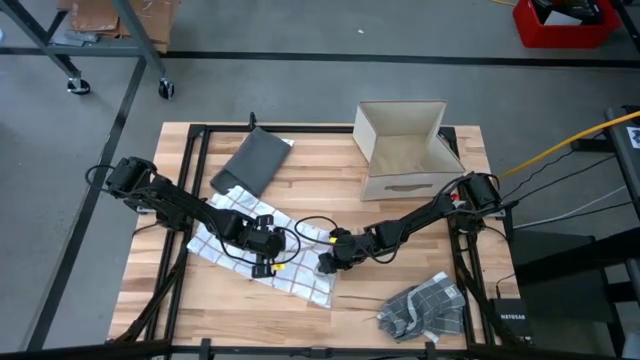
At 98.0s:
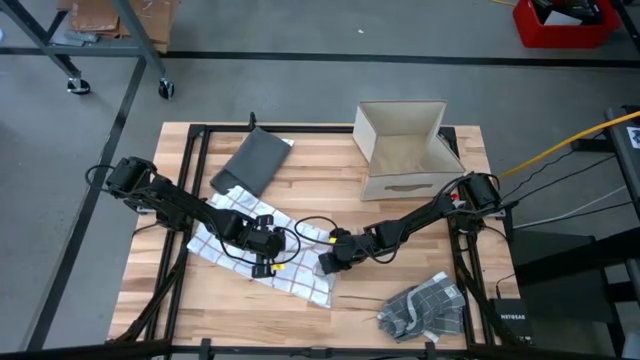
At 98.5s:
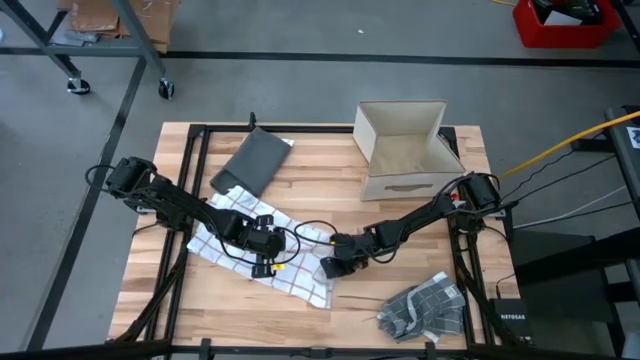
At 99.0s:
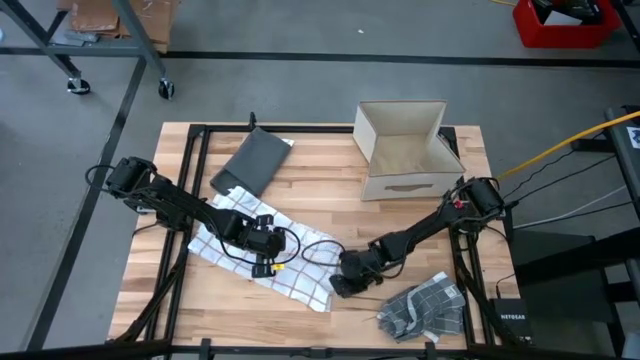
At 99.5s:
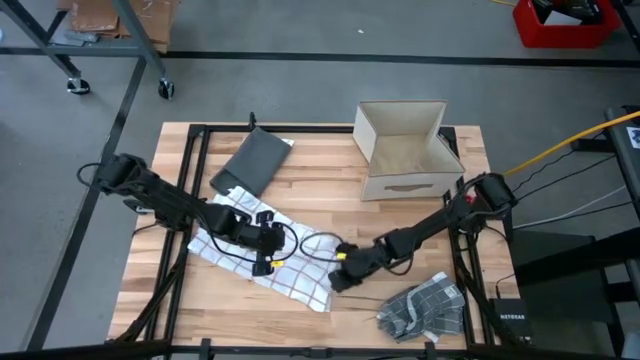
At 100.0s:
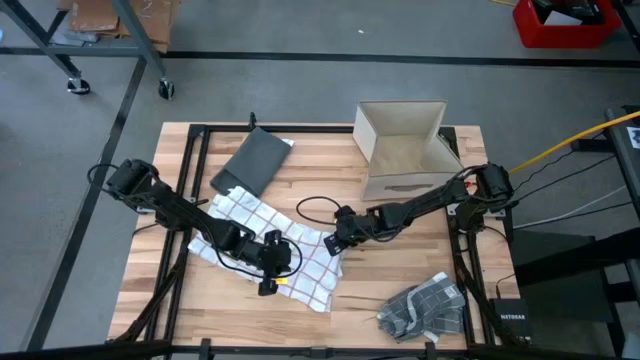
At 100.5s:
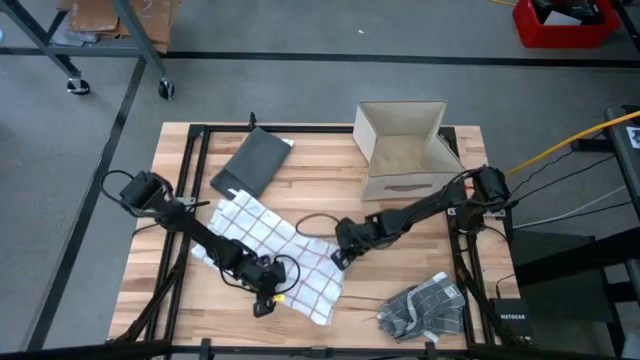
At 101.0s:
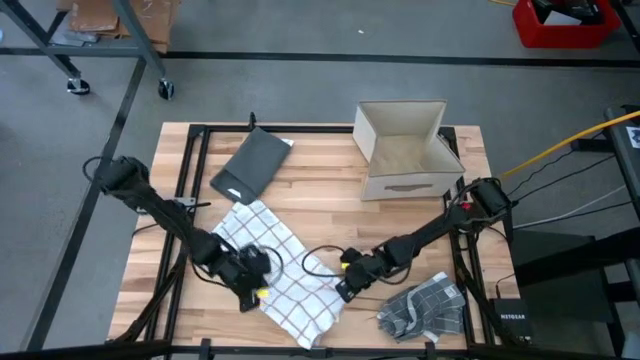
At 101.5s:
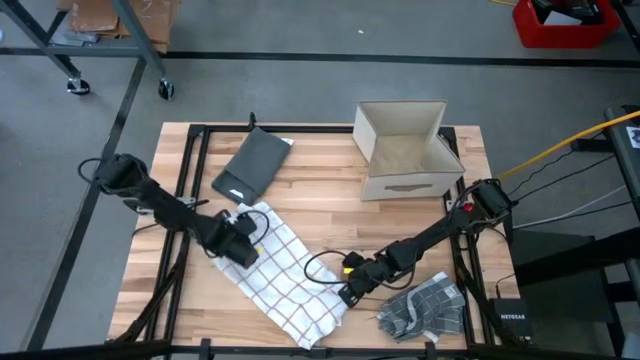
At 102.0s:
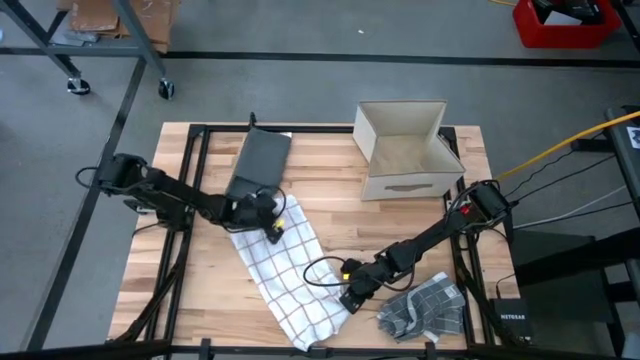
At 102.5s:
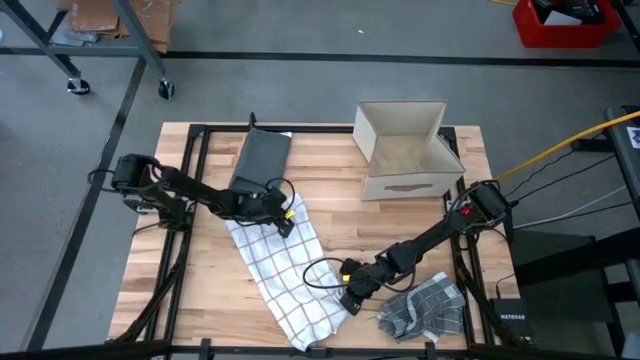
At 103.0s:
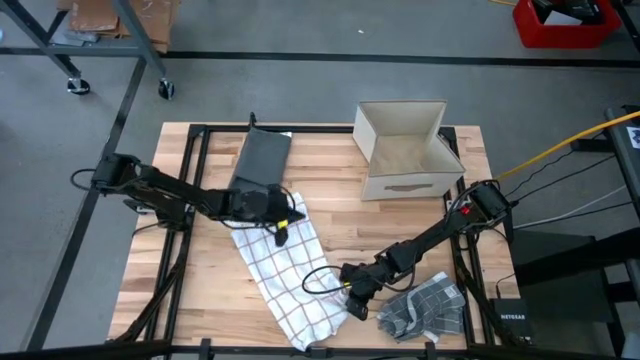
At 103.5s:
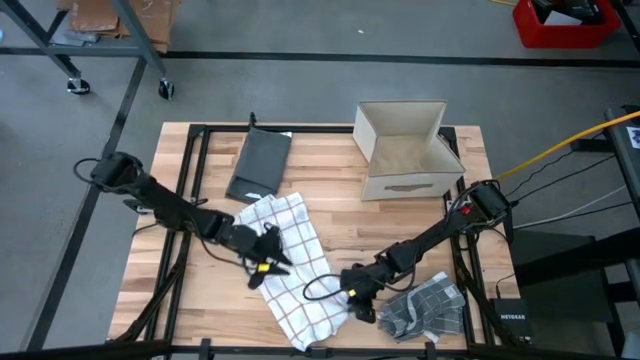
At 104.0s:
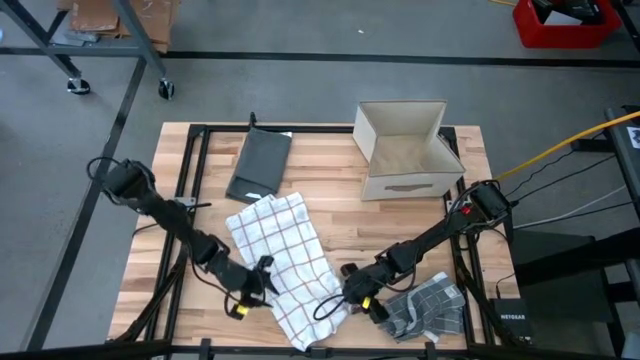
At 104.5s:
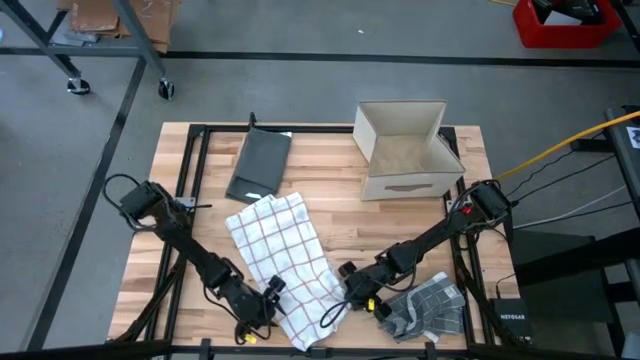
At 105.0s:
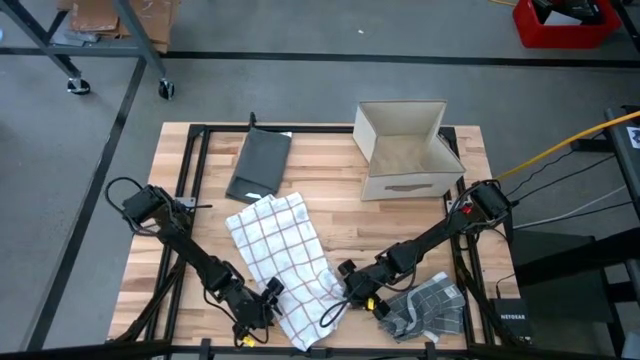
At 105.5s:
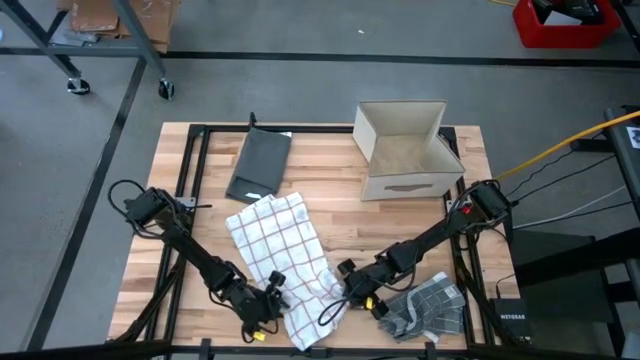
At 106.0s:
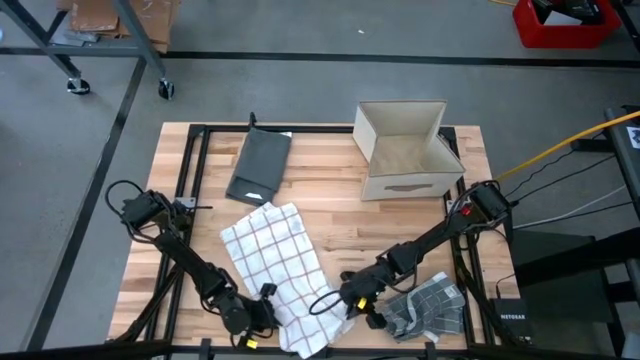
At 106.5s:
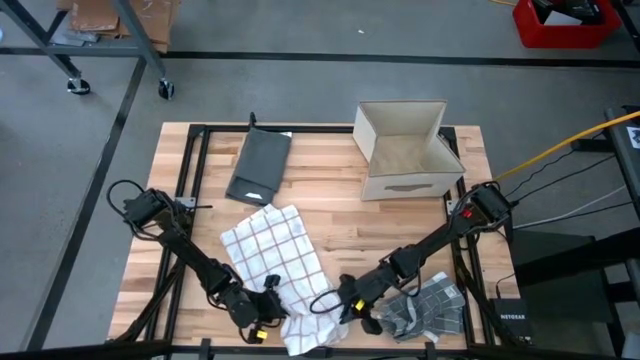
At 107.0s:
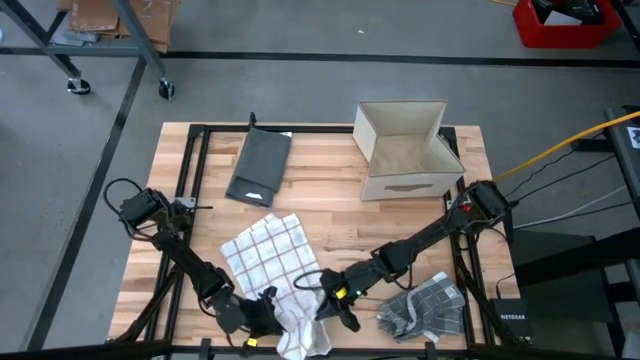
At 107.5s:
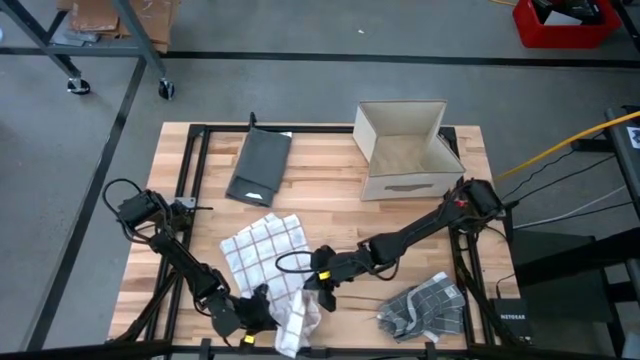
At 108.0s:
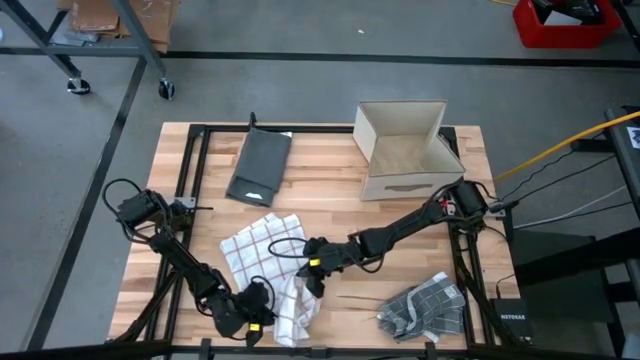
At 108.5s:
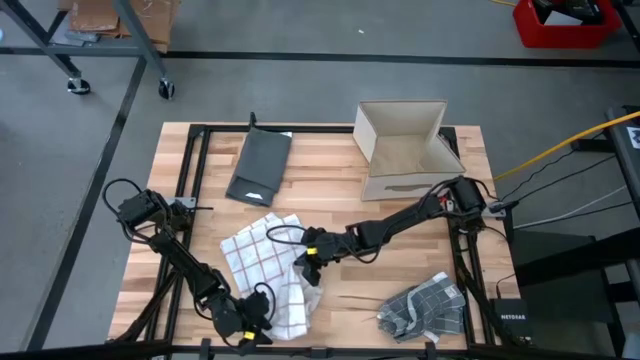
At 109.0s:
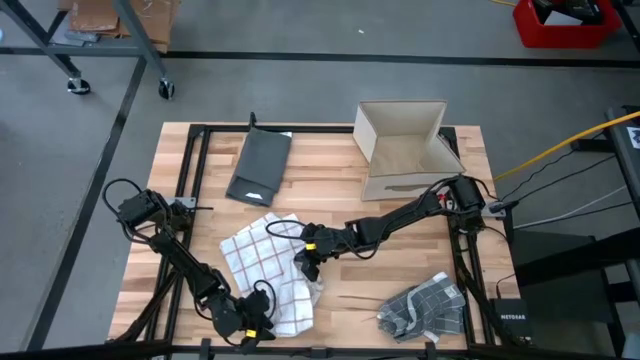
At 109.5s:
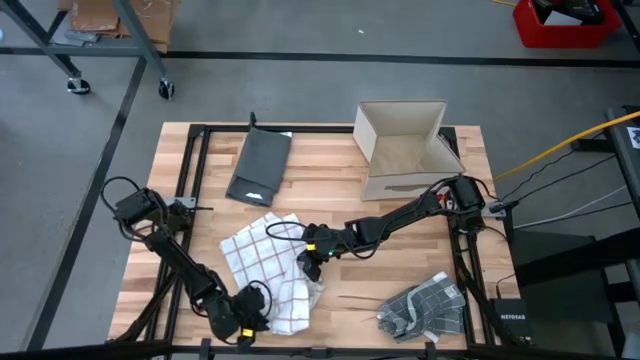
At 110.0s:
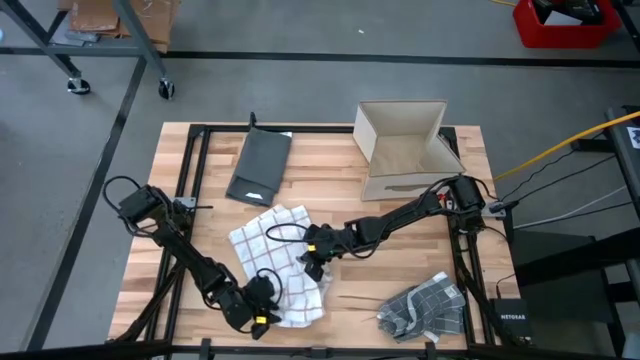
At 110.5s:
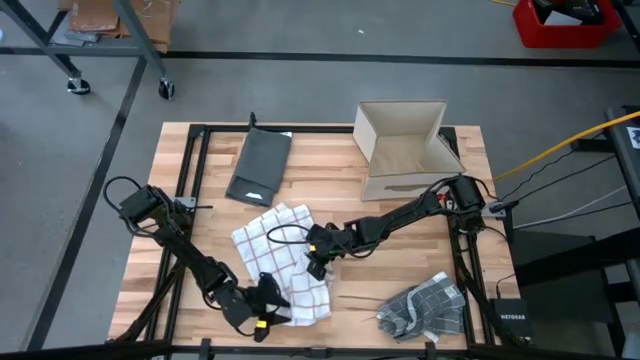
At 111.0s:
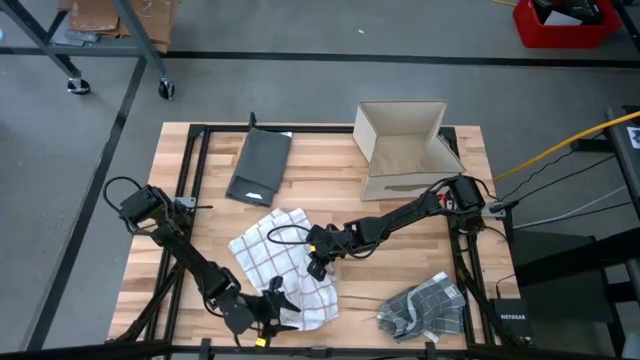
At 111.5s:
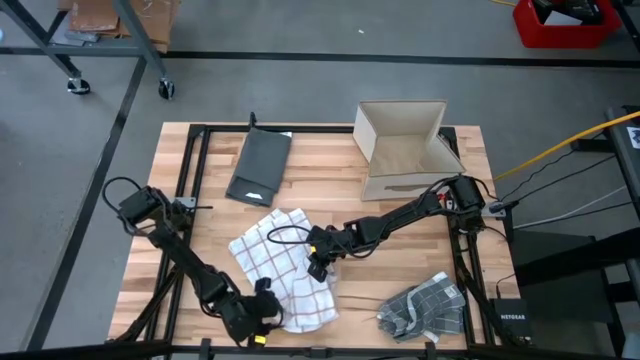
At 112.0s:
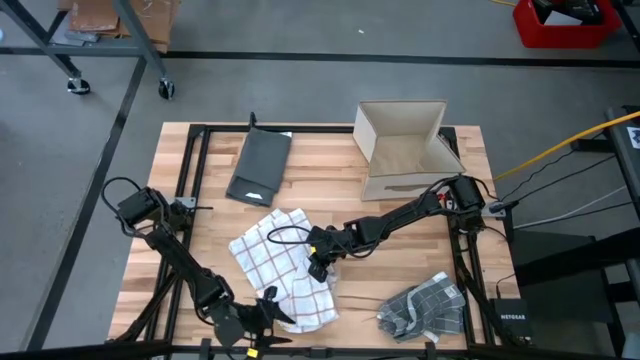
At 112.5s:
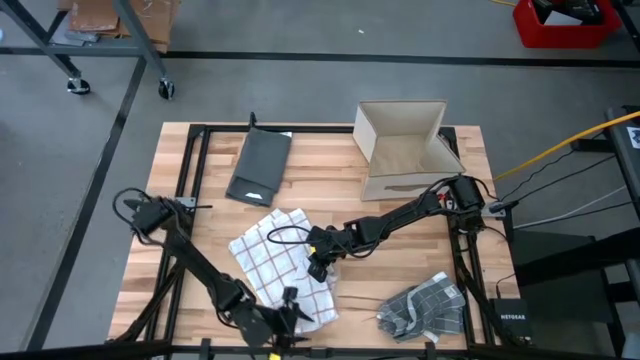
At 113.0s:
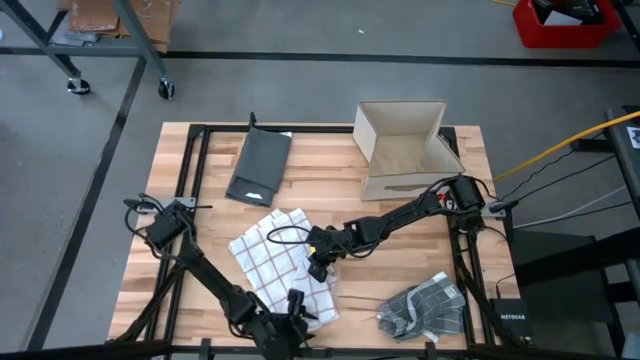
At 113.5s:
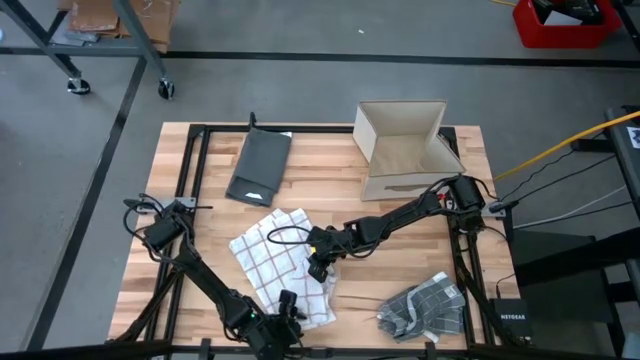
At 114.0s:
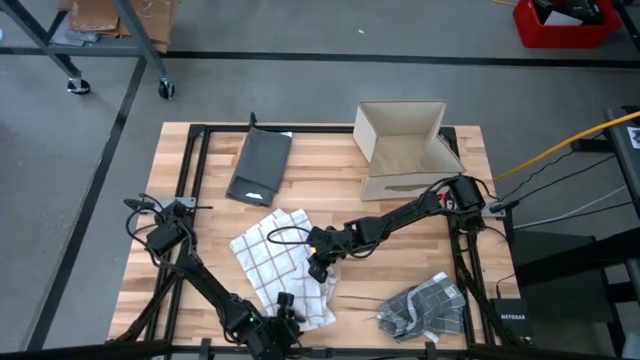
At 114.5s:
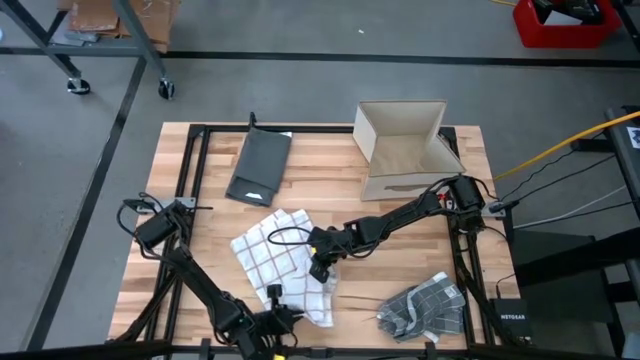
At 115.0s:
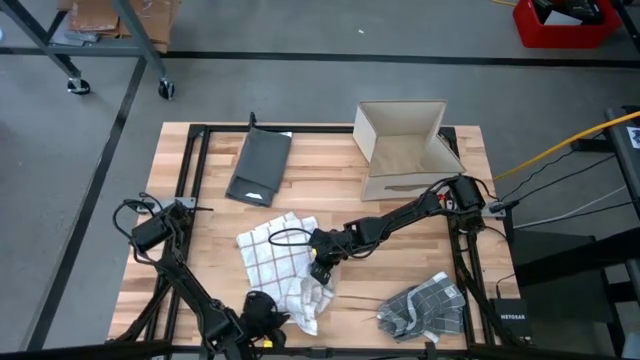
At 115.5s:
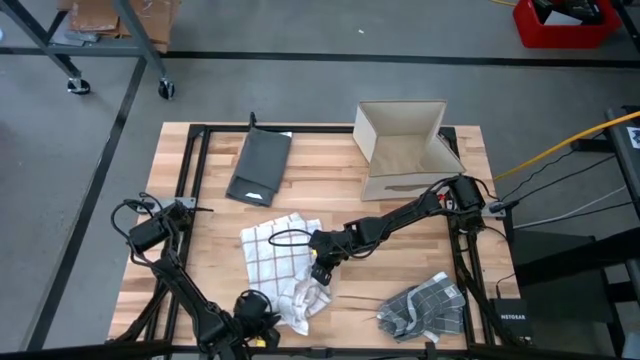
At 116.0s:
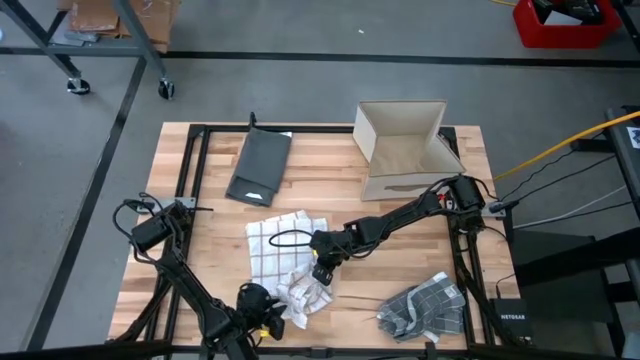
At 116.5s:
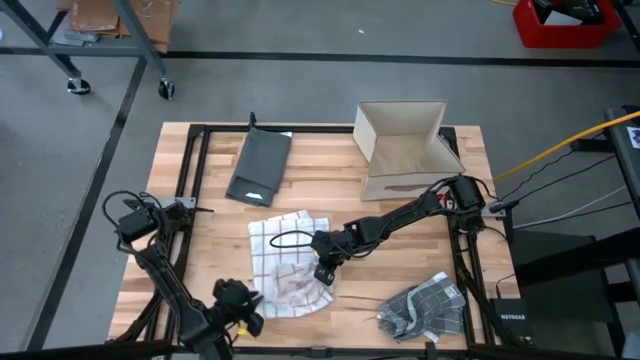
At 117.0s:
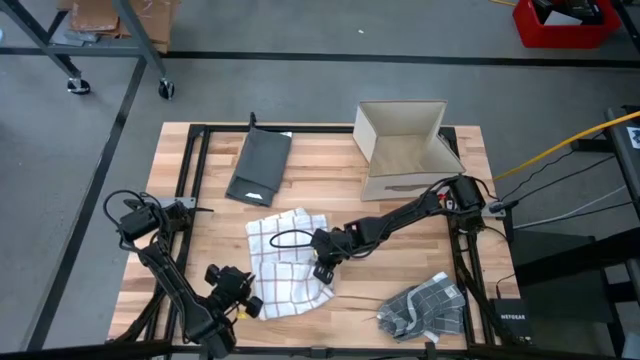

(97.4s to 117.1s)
Task: Fold towel
Fold the white kitchen towel

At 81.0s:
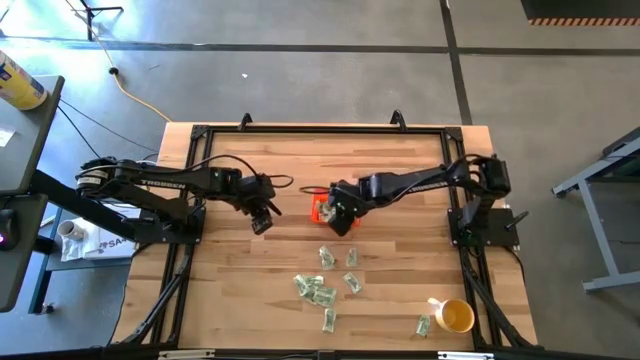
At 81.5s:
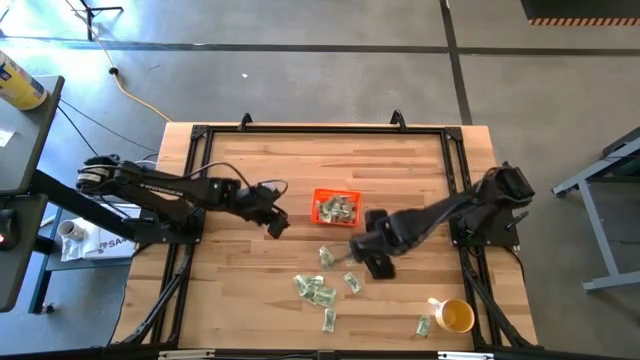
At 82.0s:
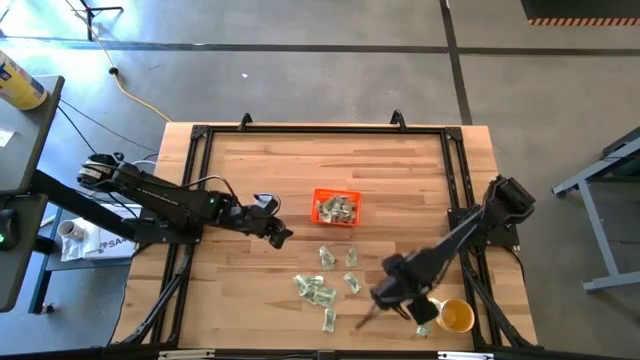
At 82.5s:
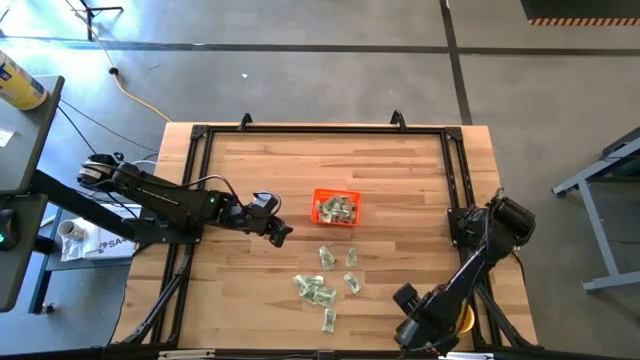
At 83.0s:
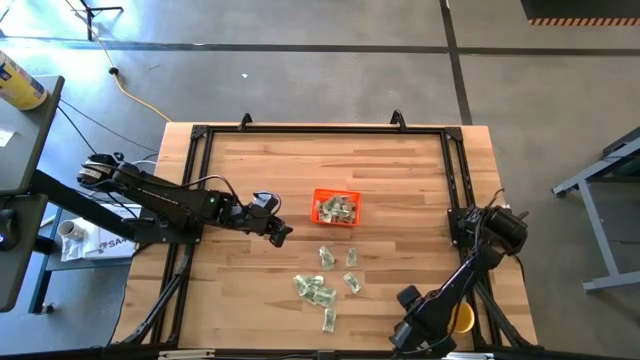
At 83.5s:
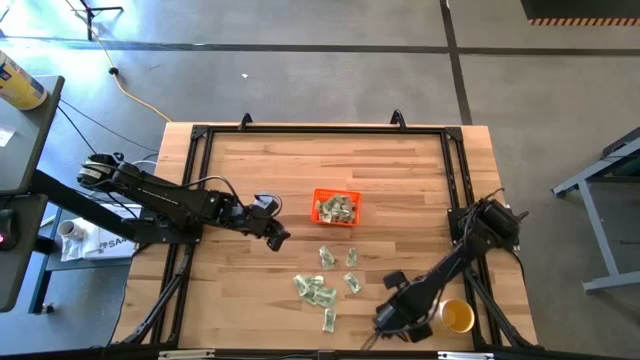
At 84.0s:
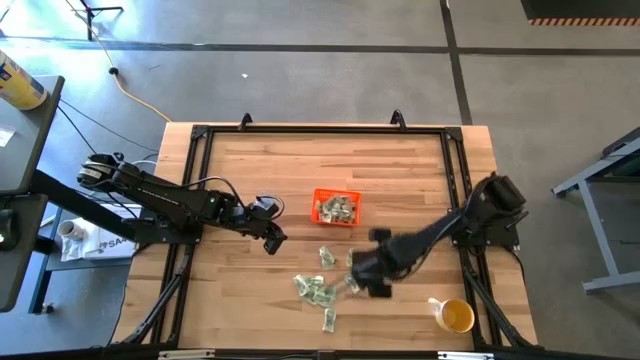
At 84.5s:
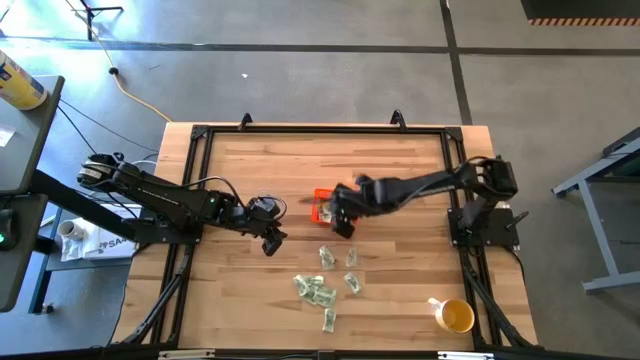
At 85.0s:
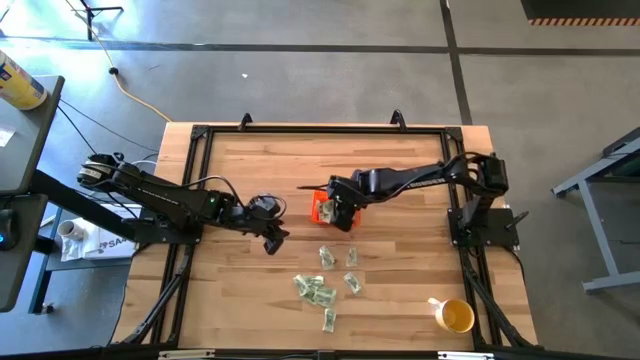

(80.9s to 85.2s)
Task: Pick and place Stevia / Truvia into bins
Put the stevia packet into the orange bin
